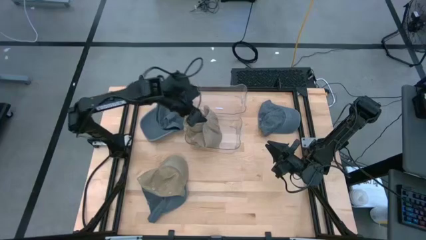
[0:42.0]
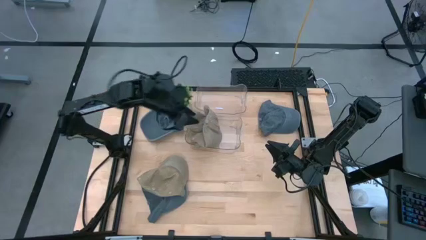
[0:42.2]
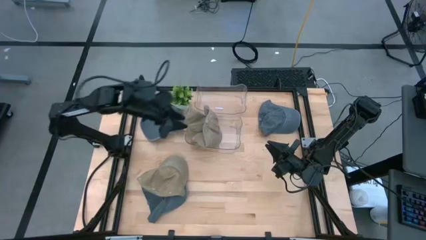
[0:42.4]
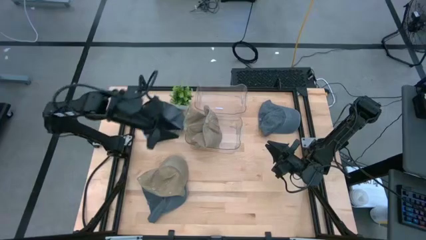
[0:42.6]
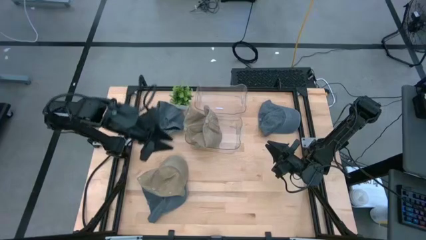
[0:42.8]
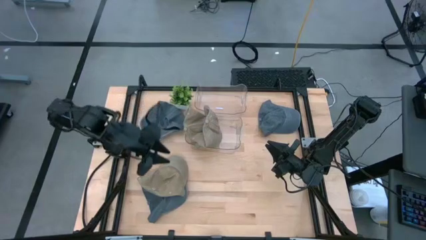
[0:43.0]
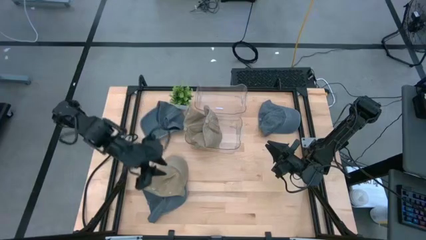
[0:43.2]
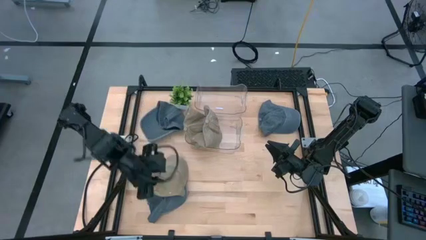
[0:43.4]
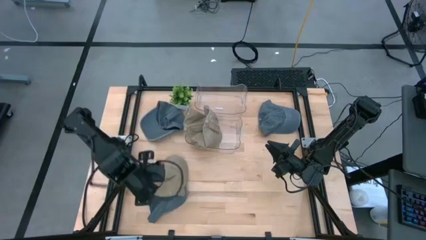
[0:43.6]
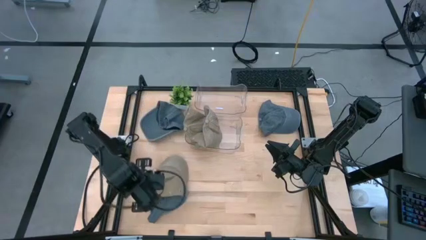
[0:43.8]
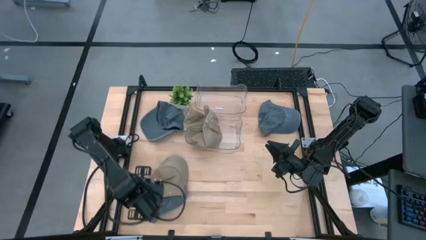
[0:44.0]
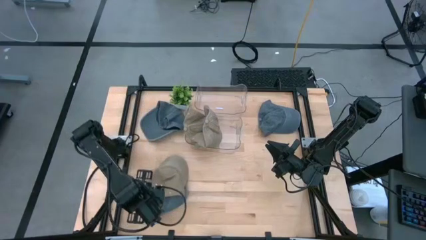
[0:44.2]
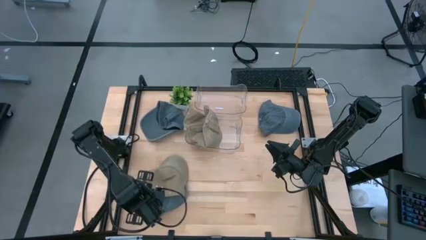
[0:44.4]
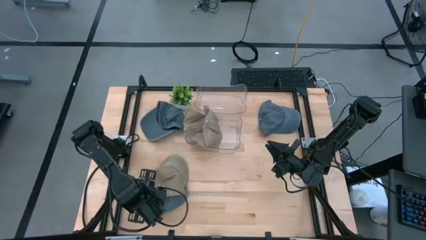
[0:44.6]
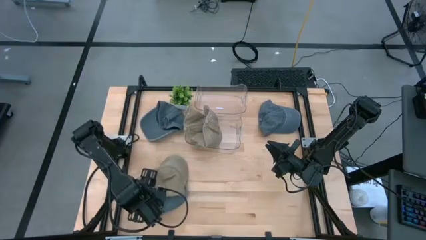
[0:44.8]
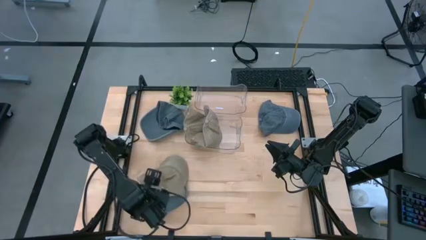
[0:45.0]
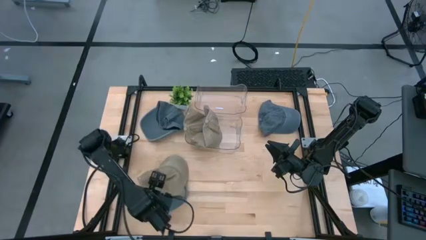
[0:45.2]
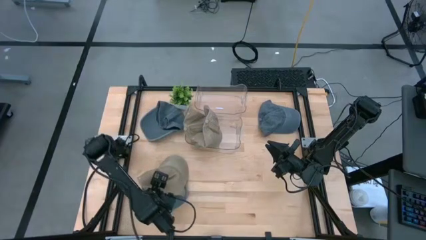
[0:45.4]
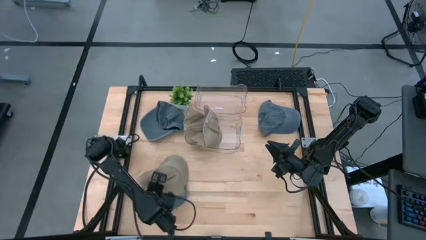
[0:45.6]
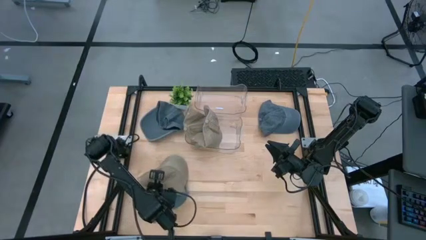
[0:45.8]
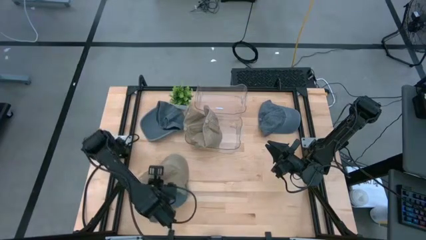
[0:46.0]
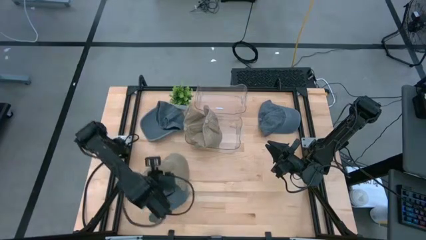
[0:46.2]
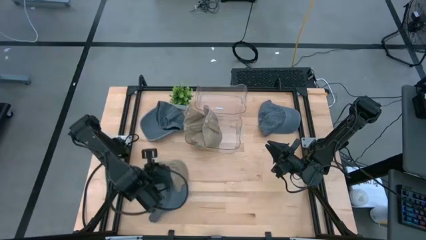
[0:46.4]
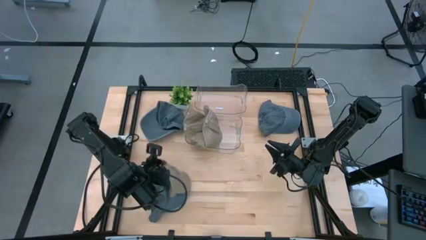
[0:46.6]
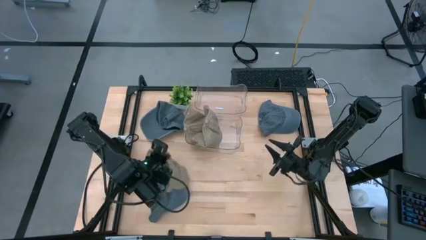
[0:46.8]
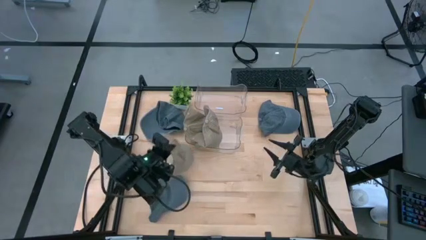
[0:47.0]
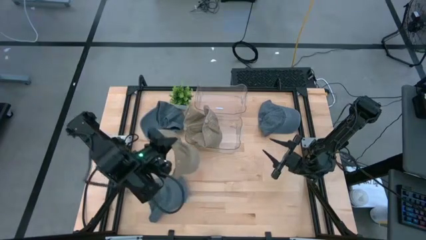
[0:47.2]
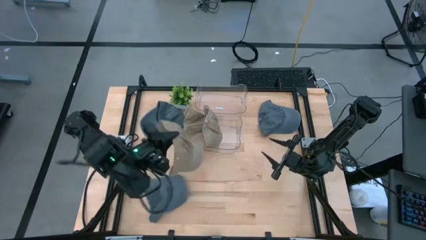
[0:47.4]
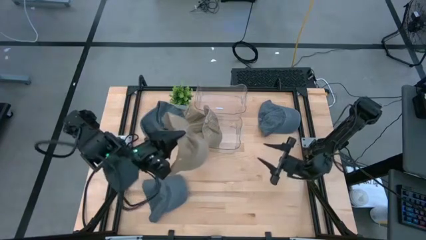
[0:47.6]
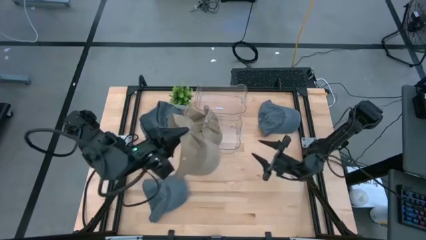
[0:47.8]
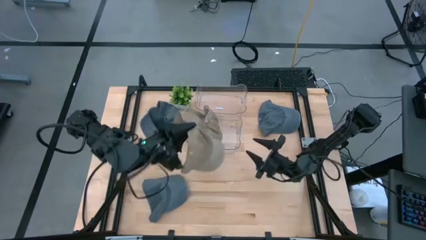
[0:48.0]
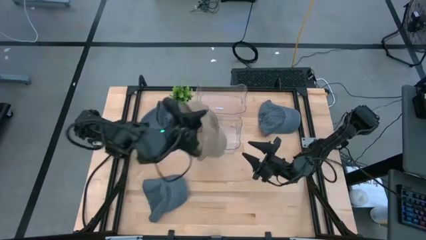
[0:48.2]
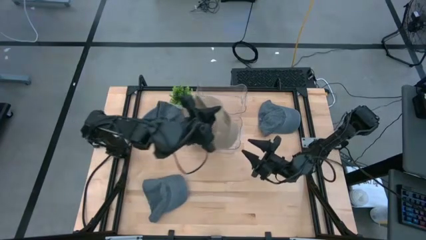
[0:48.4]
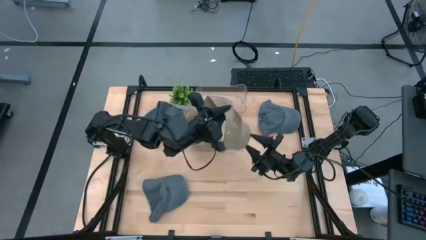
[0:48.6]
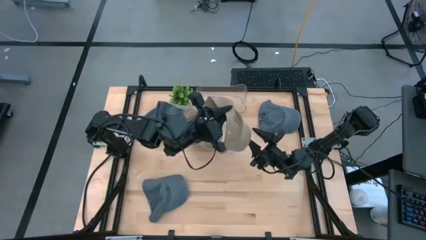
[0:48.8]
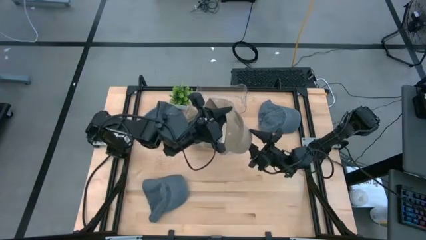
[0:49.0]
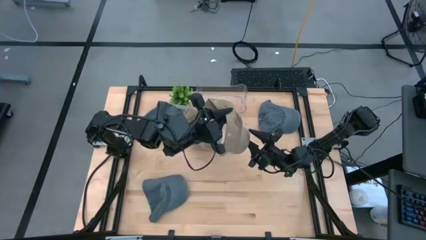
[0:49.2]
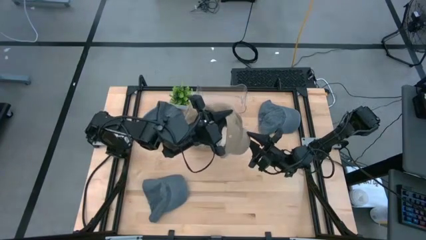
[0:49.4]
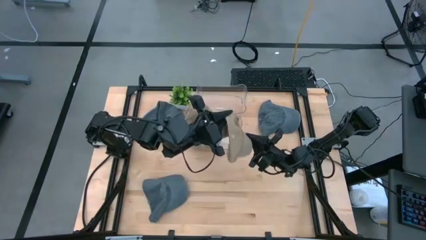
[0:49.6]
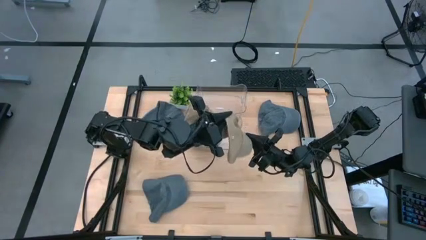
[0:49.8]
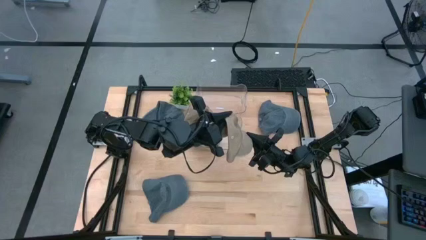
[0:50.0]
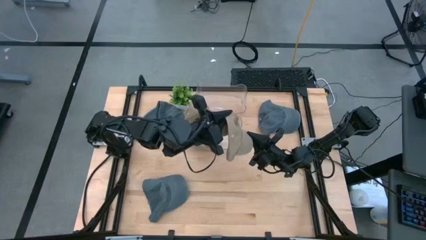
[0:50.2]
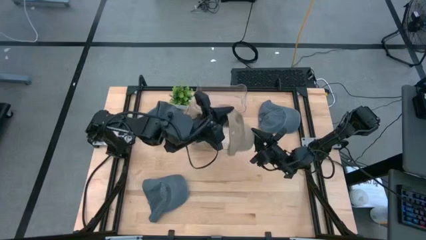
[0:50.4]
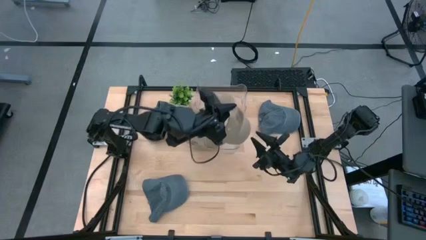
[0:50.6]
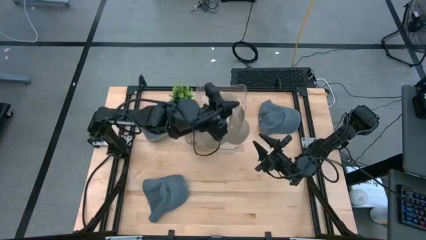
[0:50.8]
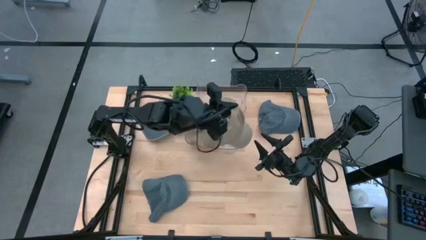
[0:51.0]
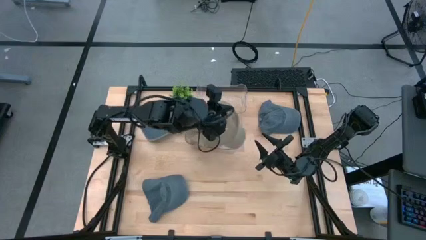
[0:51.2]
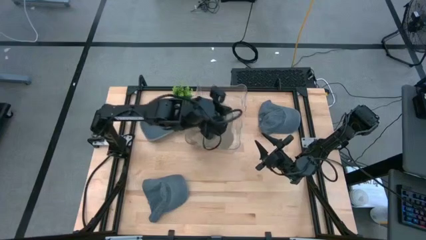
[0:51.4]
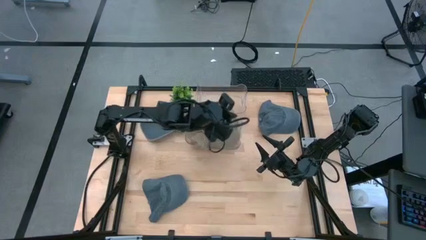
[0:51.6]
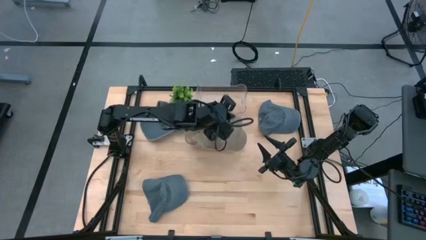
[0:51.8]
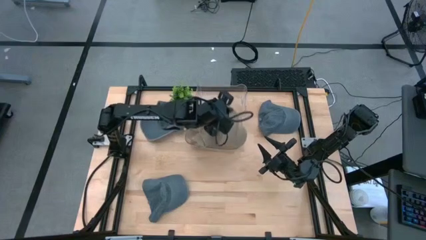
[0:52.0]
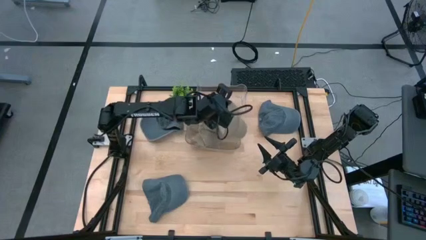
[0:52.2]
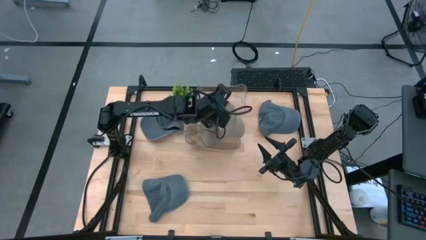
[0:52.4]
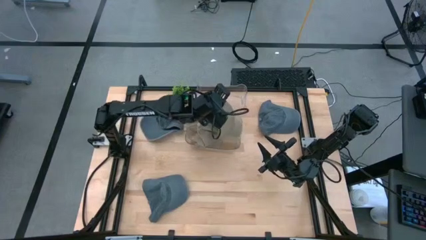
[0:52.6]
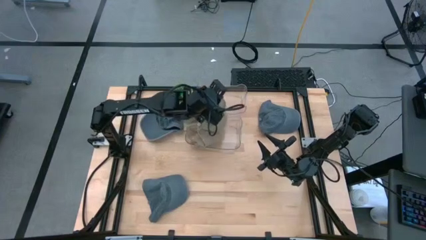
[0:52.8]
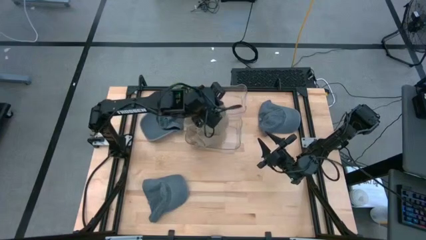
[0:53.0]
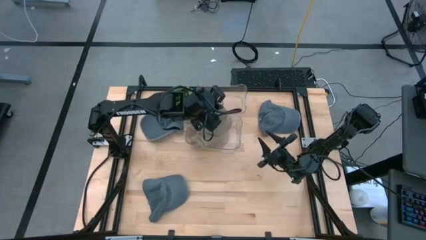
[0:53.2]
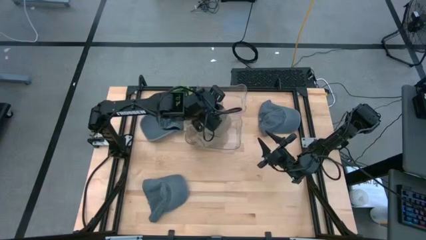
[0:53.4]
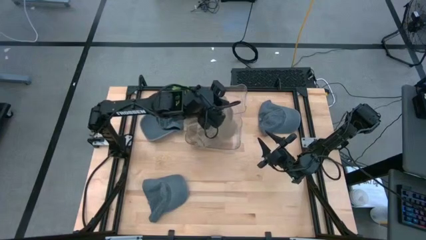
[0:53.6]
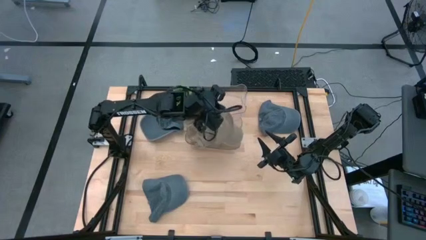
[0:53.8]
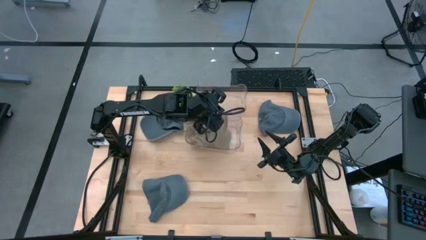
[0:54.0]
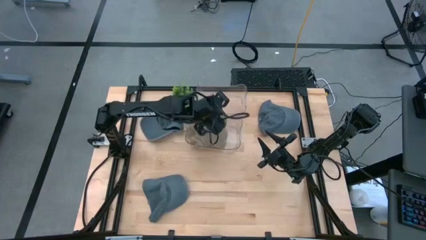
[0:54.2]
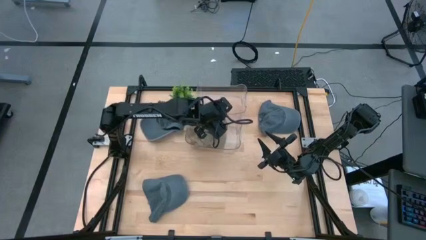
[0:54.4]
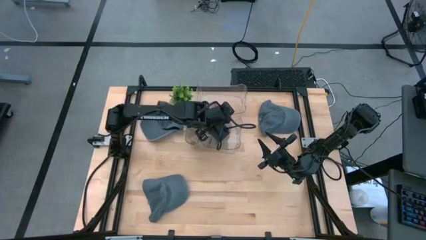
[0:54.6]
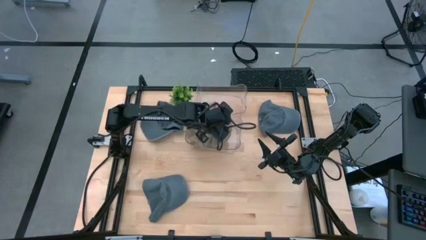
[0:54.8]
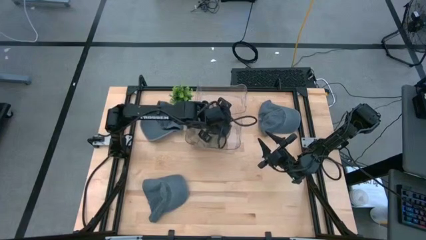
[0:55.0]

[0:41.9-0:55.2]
Task: Pick & Place hat
Put the brown cap into the bottom transparent bin

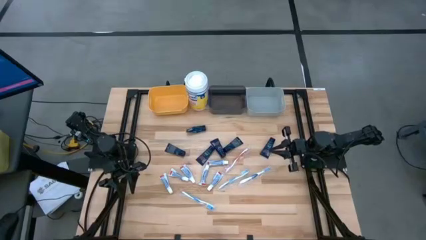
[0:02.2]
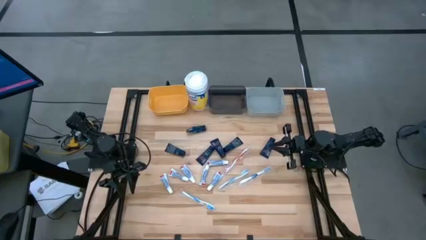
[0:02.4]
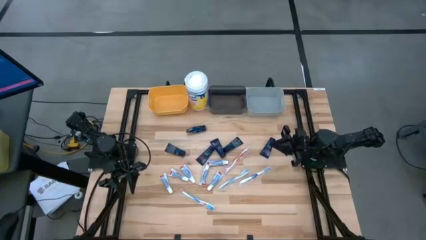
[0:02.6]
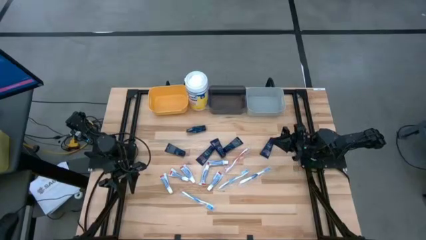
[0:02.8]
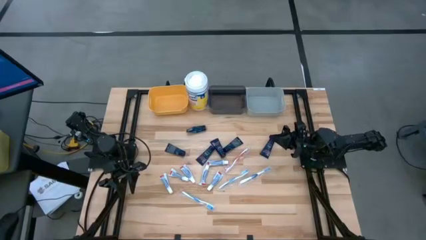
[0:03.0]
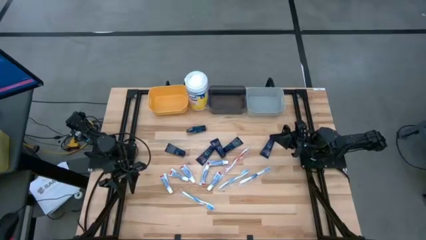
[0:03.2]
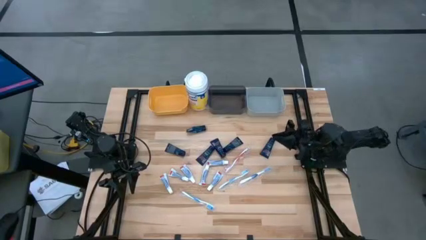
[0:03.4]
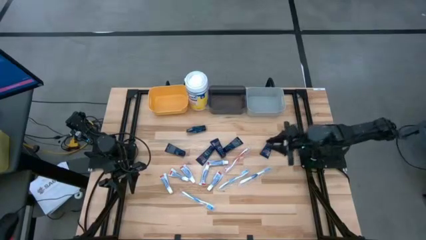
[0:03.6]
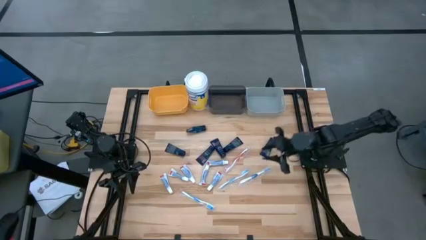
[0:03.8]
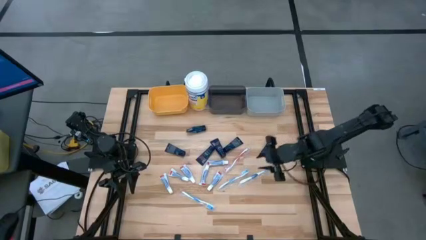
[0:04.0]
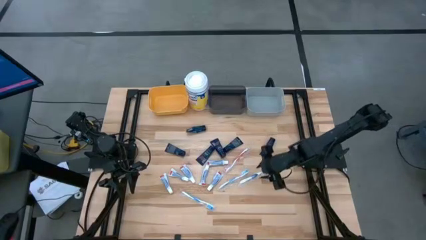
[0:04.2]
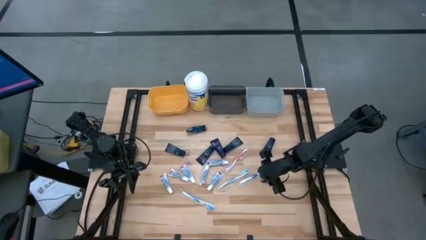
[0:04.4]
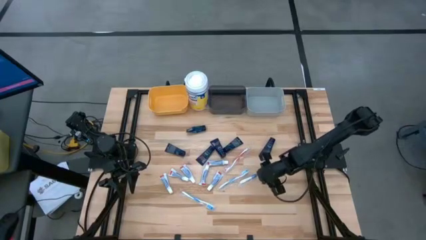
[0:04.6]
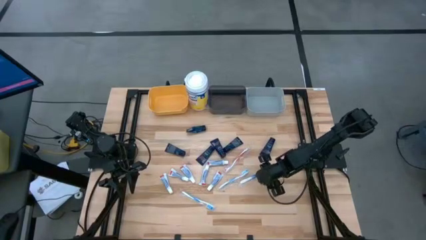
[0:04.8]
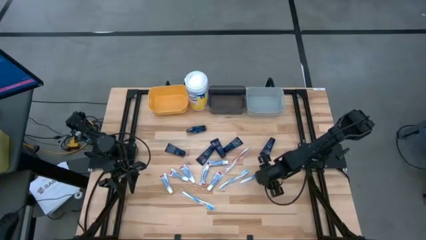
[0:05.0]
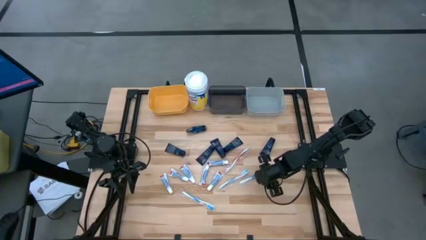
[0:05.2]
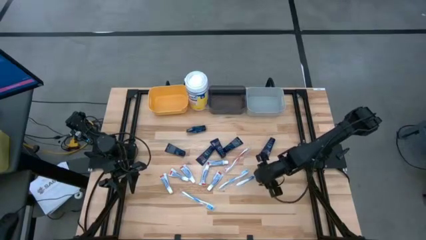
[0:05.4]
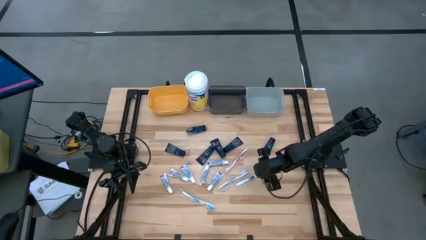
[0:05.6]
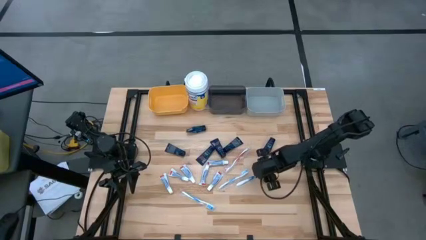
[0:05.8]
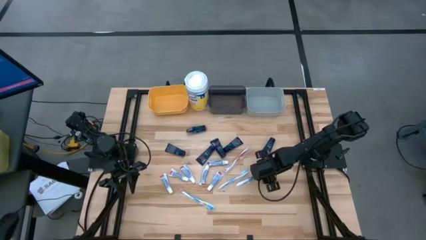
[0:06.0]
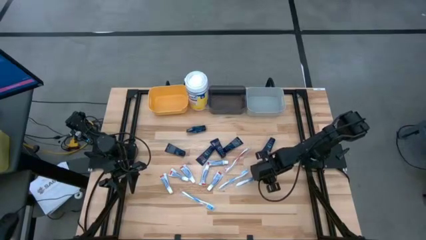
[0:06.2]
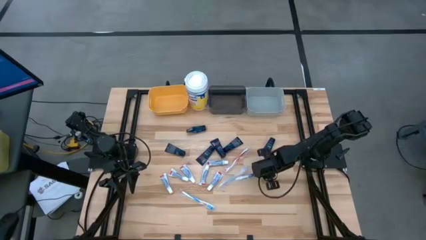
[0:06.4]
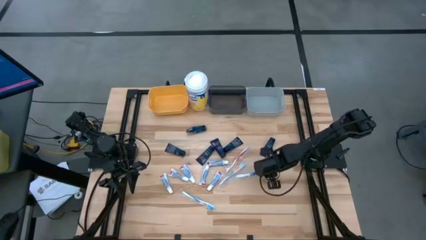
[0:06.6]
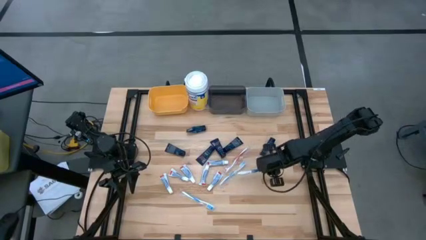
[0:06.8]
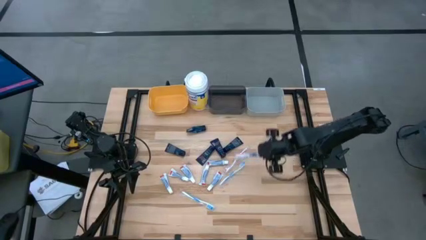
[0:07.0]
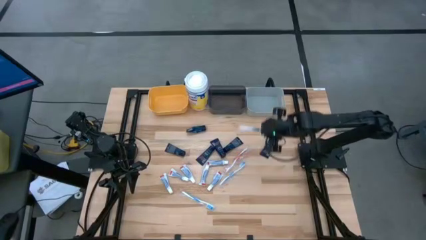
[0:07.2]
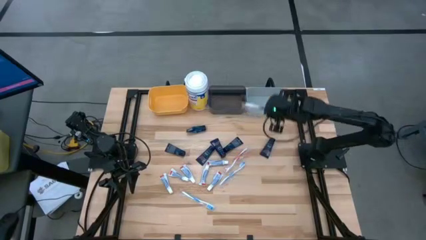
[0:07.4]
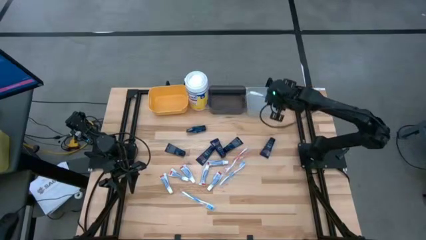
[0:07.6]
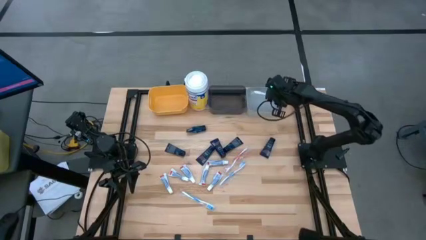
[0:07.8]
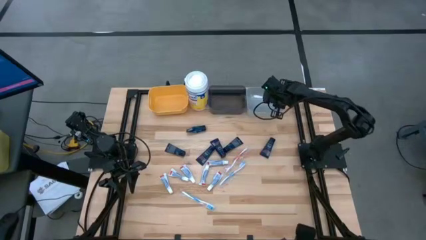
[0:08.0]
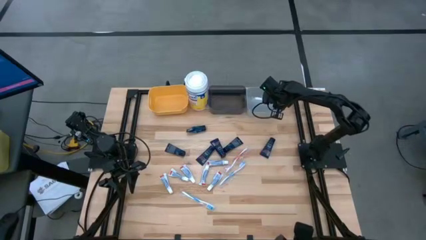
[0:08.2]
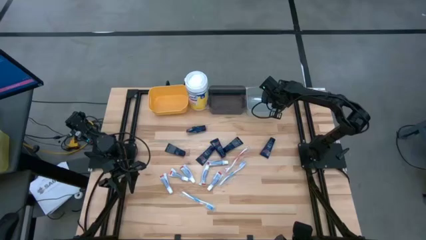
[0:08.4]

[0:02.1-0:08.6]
Task: Pick & Place Travel size toiletries
Put the blue toothbrush into the gray bin
